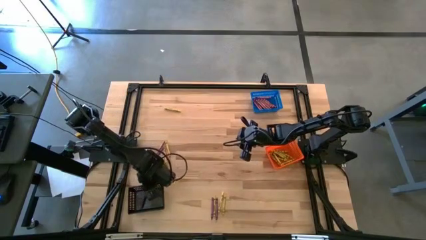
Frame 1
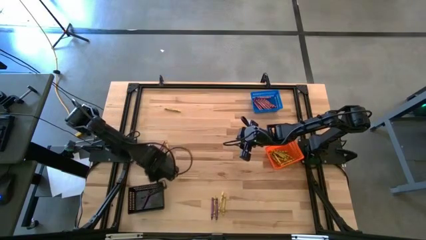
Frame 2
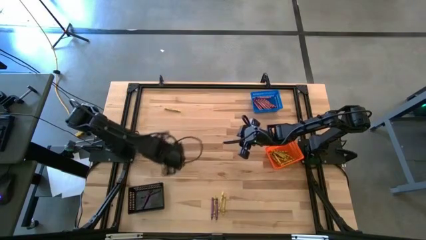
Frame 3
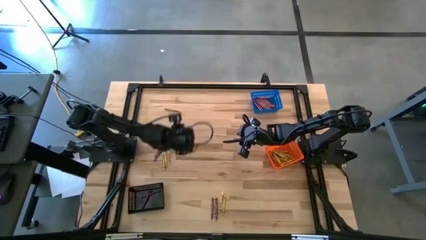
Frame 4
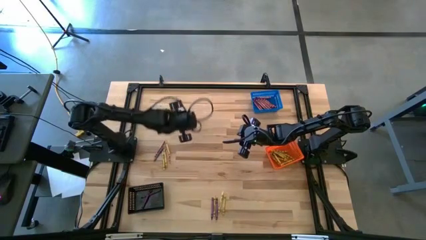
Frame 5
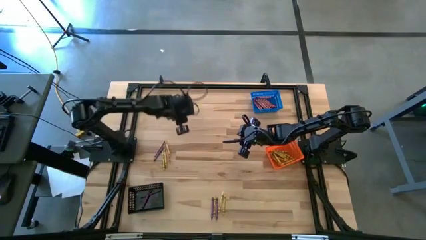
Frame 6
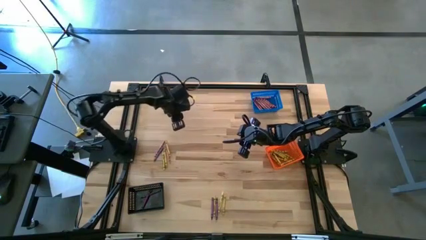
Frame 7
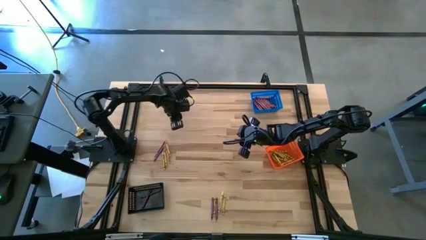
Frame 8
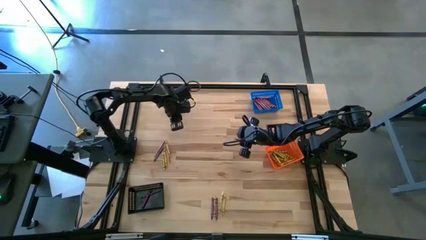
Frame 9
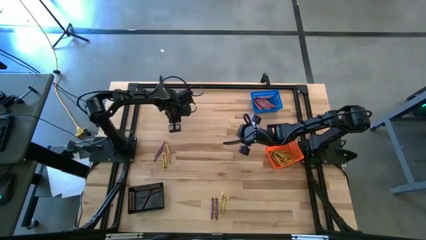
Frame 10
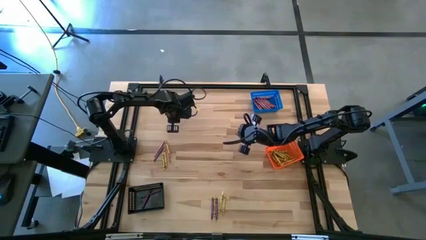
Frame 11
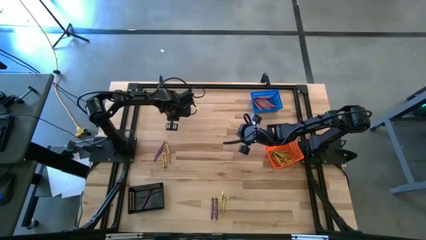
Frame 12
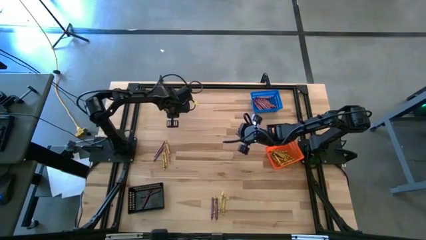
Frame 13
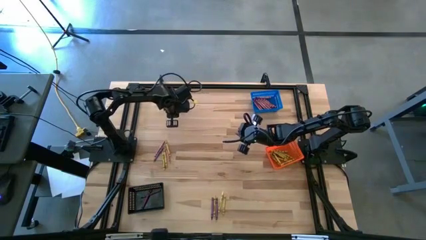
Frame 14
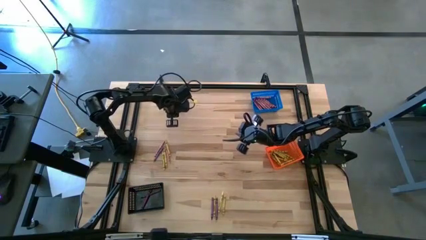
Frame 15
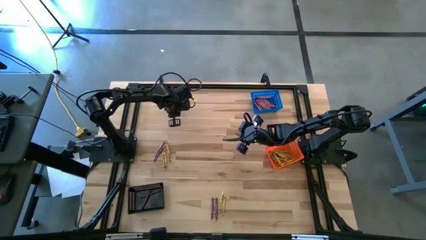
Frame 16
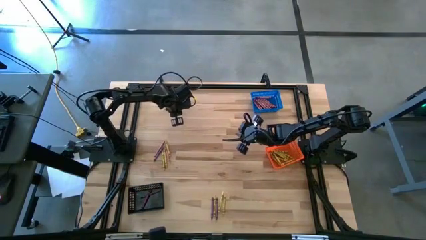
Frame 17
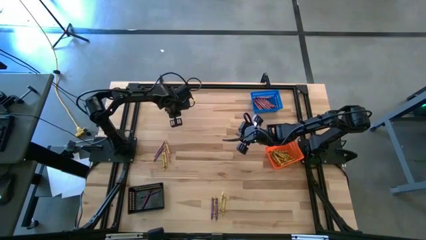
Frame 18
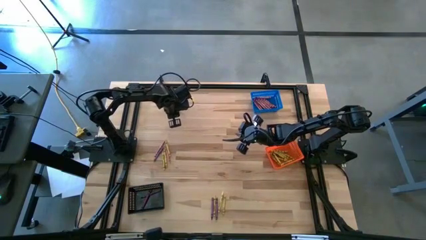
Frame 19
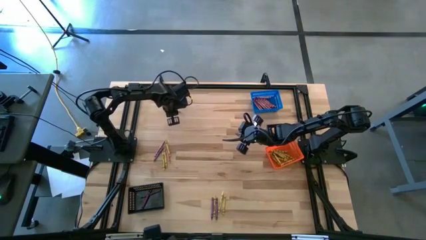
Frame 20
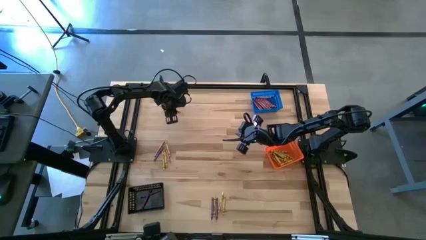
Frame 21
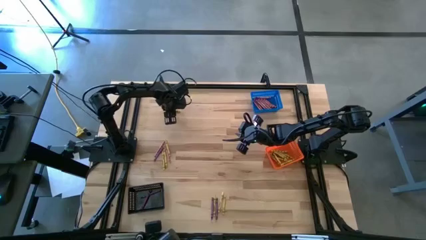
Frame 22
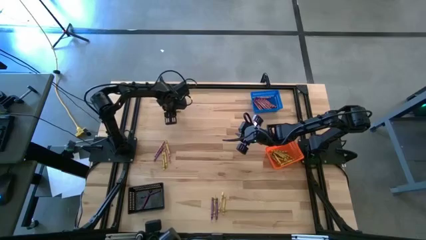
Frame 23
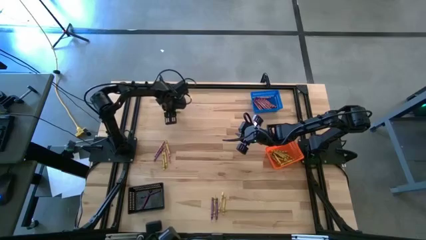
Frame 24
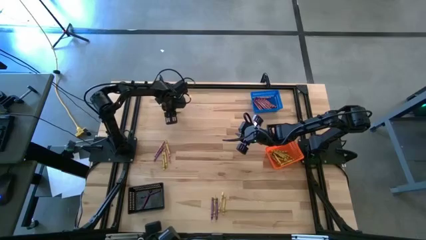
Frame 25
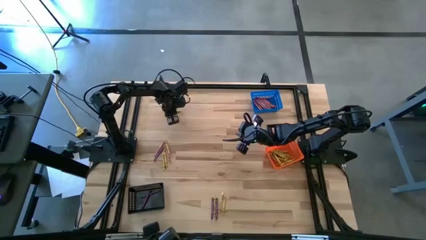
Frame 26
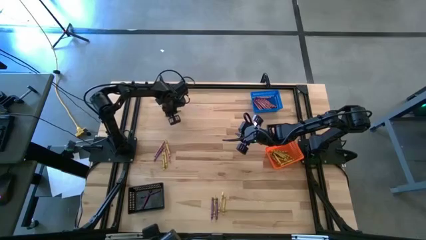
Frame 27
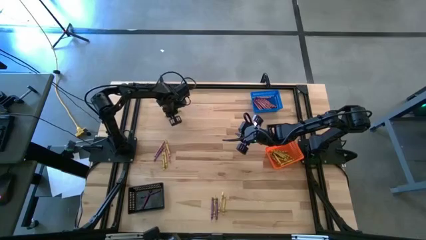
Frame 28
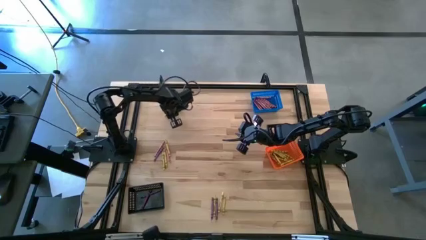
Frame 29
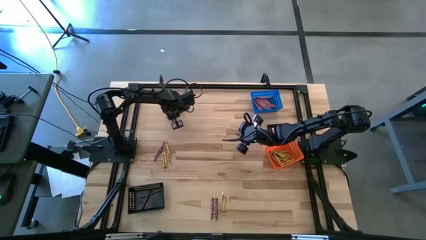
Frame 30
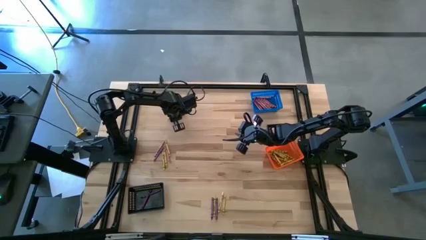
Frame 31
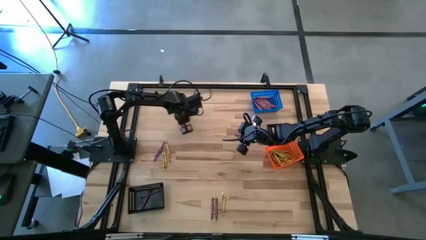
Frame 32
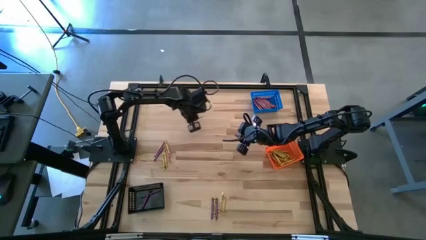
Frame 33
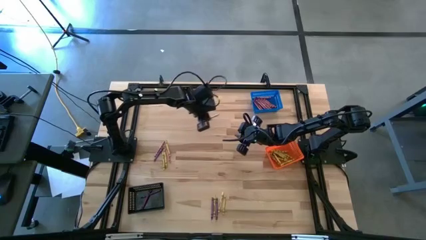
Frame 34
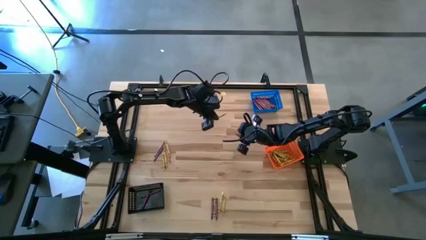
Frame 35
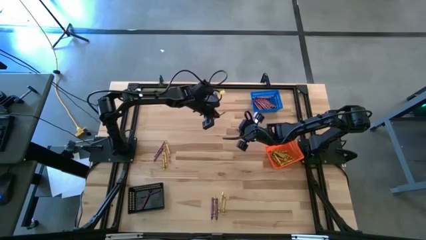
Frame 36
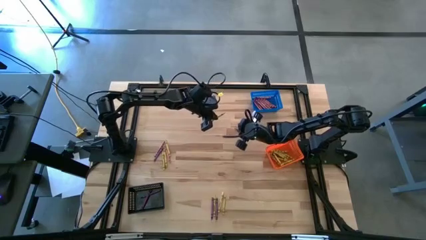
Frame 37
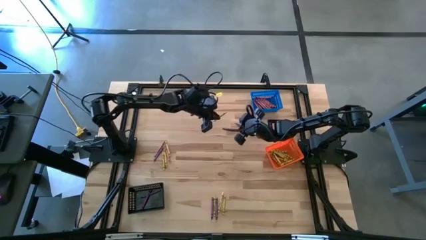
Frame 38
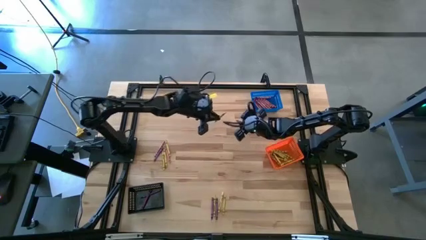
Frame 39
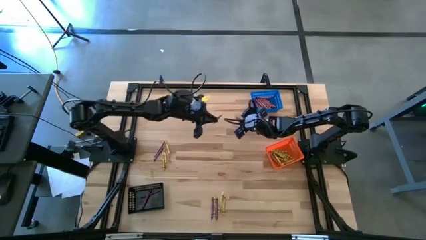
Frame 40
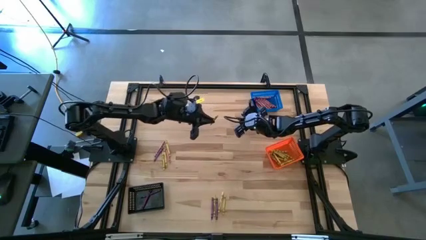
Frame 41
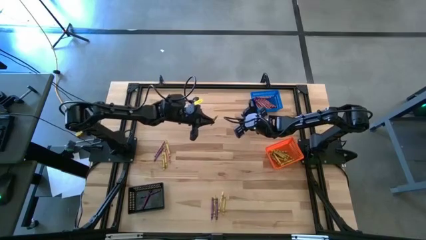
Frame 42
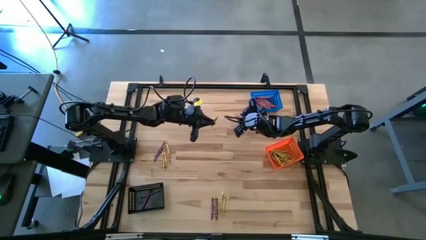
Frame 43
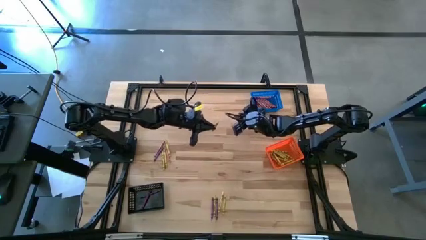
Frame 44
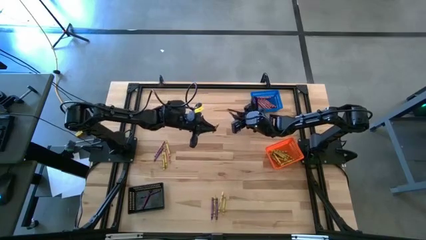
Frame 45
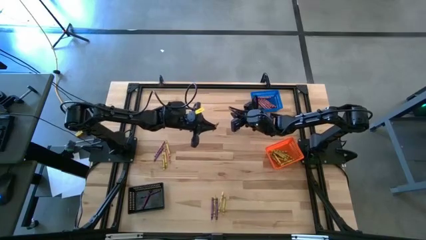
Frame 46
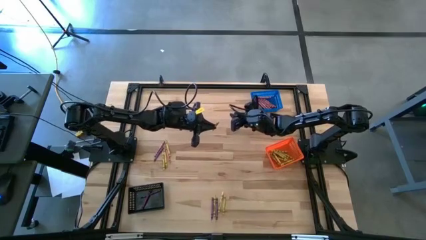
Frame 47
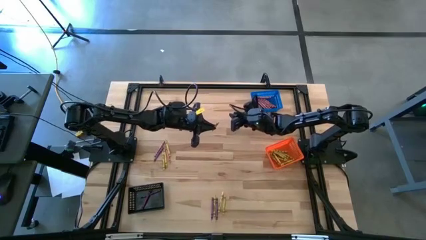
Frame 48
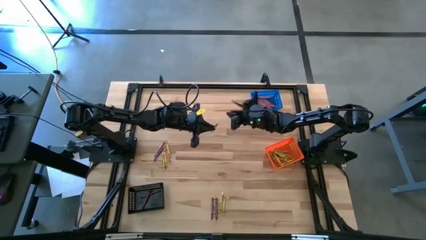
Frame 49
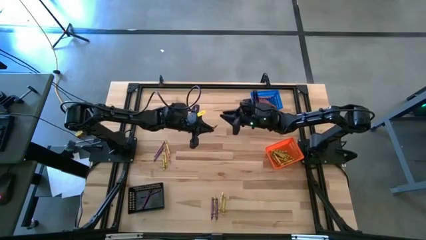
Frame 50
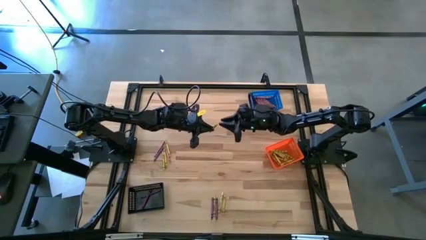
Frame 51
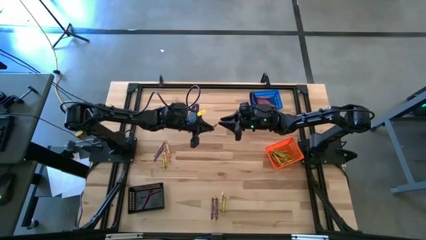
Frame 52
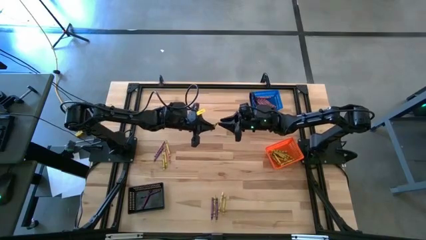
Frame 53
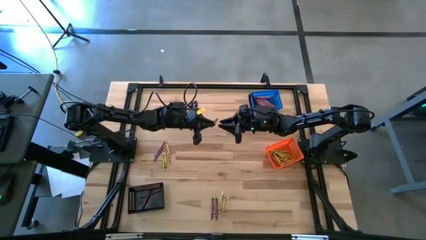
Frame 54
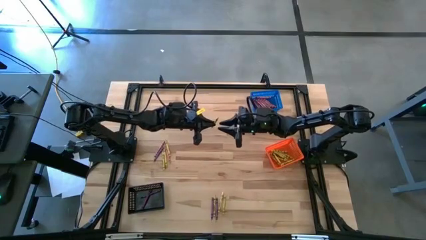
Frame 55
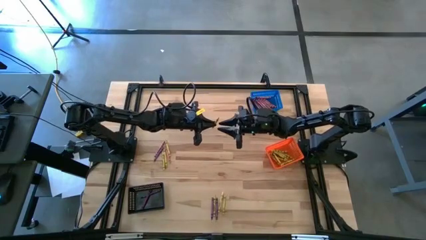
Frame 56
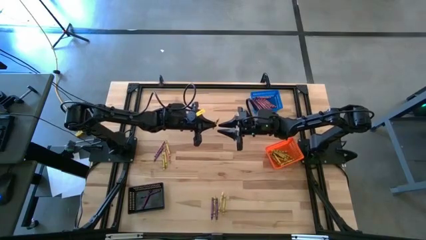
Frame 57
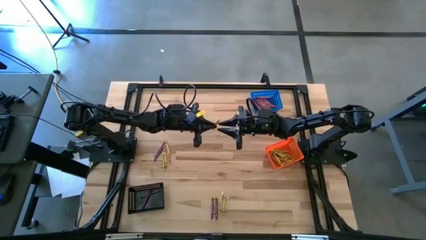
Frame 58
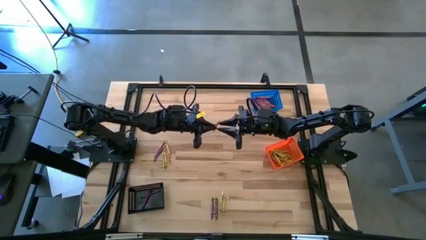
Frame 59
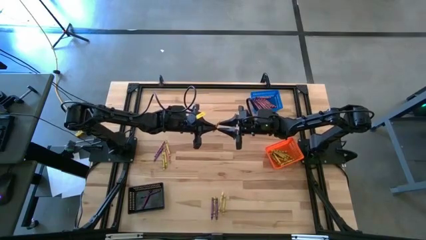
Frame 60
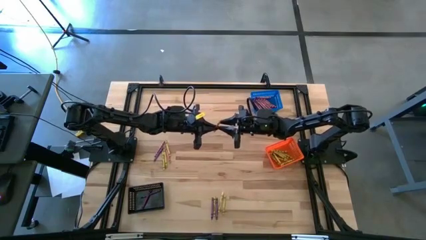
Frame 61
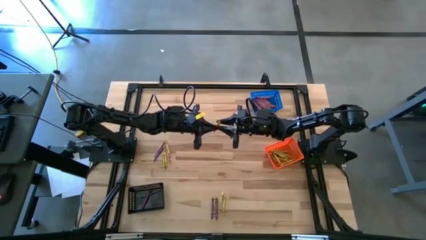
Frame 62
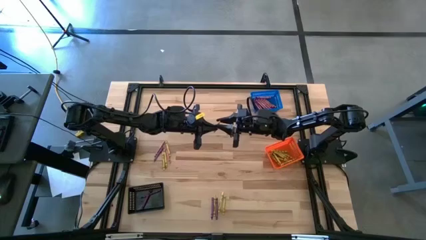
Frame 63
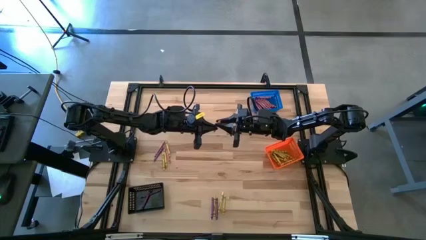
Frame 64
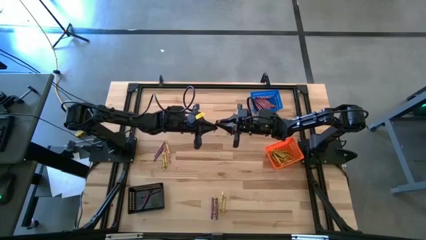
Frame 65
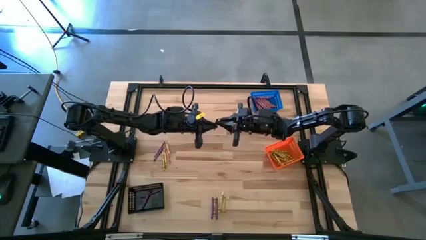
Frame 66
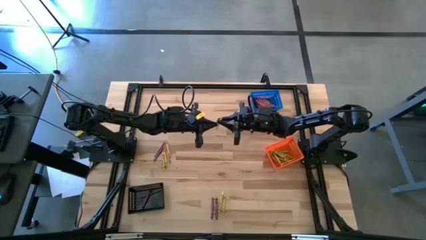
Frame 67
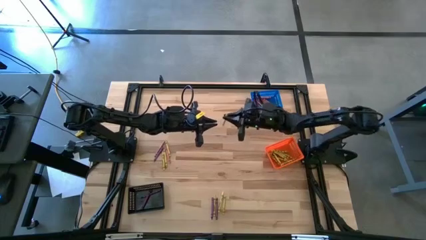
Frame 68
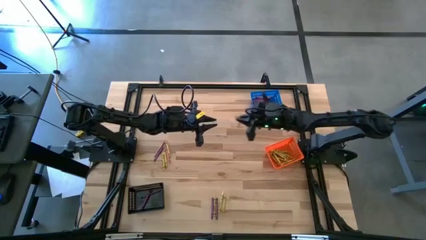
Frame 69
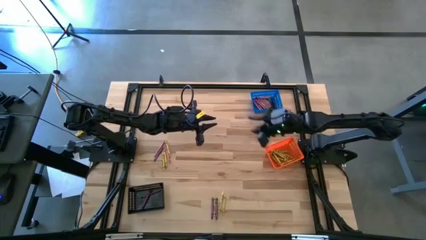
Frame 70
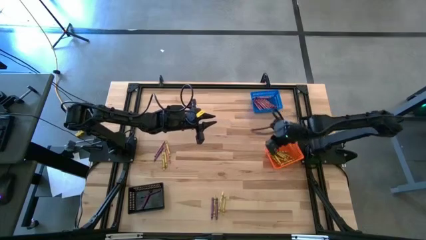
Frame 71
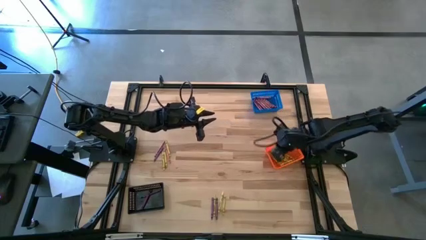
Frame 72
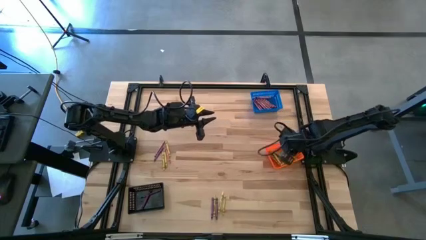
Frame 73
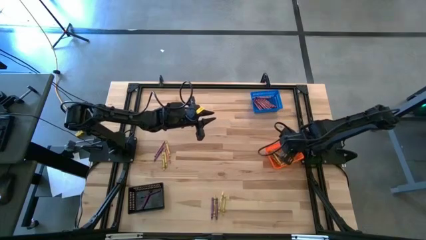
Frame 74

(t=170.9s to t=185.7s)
Task: Sort crayons
Put the yellow crayon into the orange basket

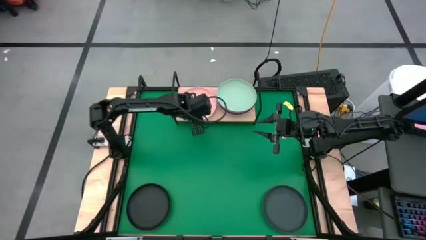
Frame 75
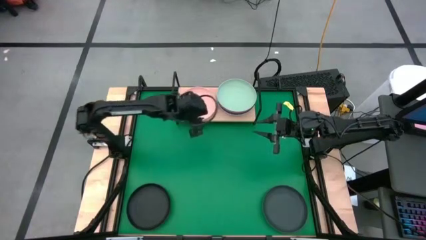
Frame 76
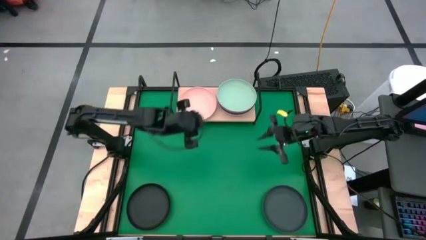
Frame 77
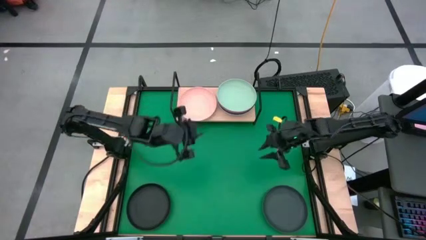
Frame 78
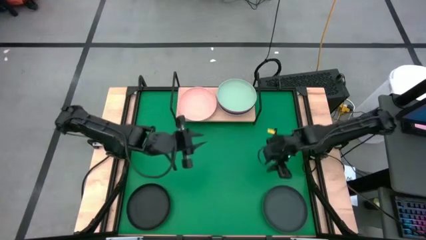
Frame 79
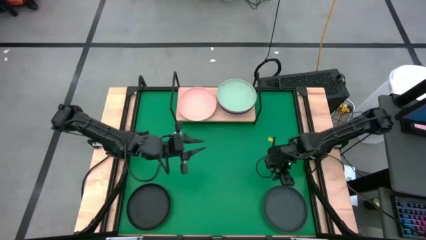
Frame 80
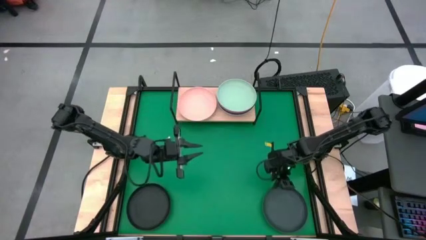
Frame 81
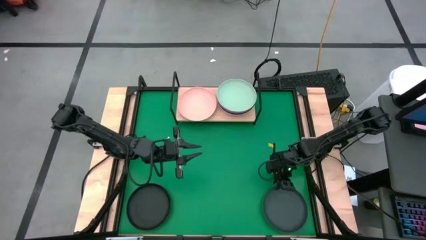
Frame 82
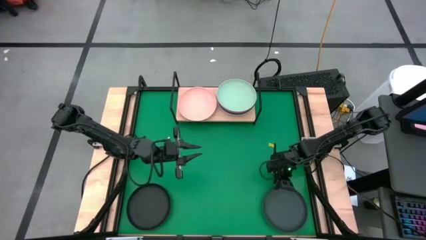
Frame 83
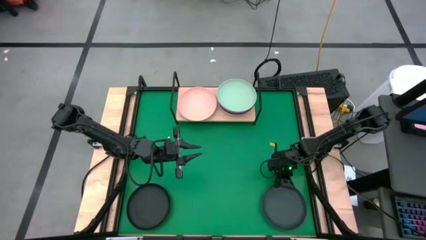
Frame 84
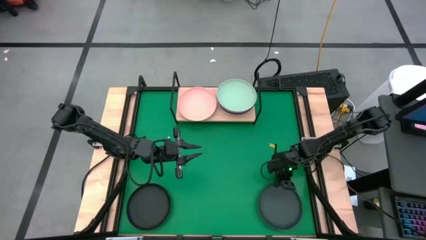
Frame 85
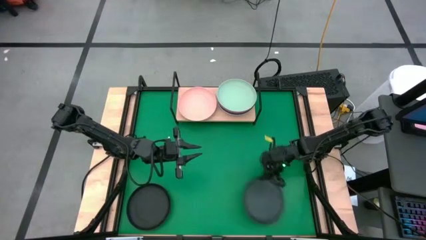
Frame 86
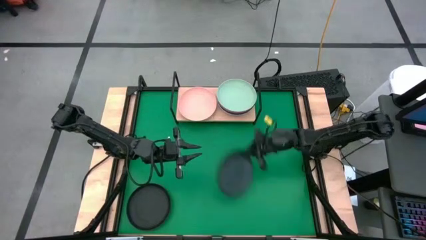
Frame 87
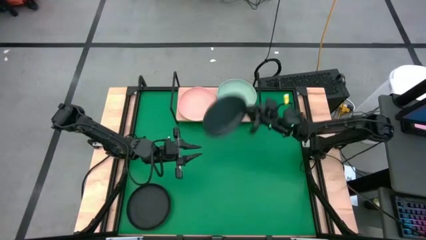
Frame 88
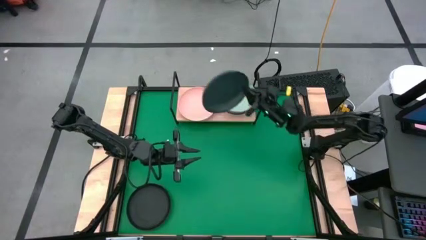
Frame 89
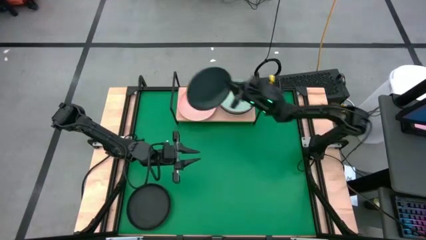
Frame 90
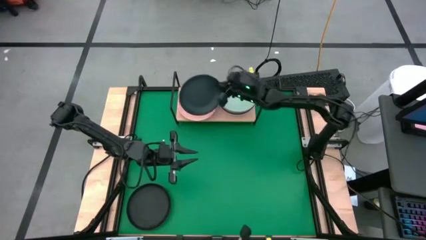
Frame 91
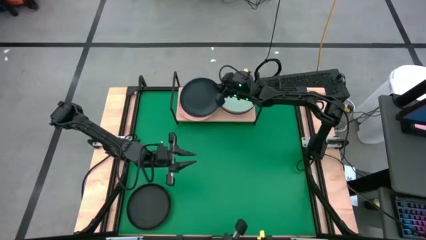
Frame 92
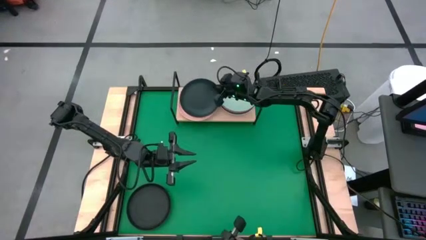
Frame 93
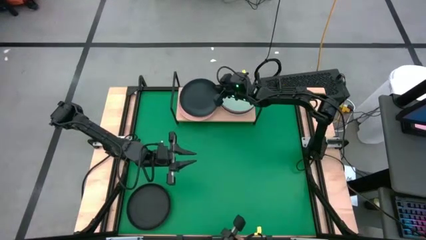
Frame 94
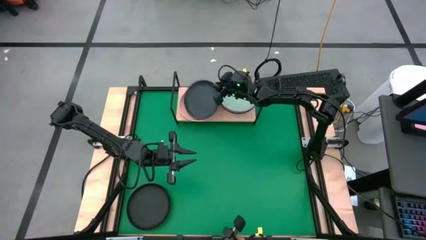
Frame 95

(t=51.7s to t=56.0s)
Task: Place and stack plates onto a shelf
Stack the right black plate on top of the orange plate on the shelf
